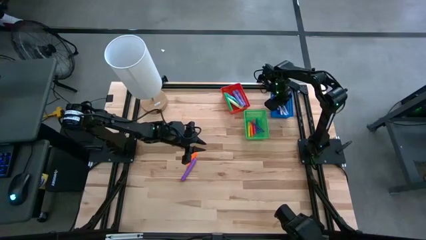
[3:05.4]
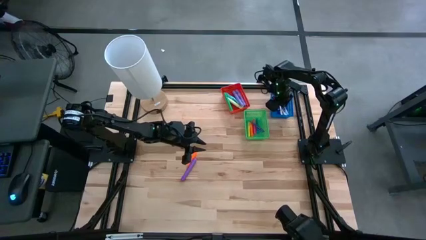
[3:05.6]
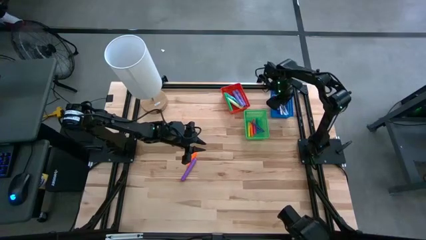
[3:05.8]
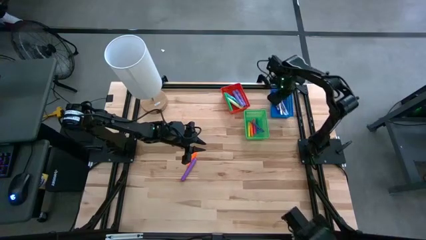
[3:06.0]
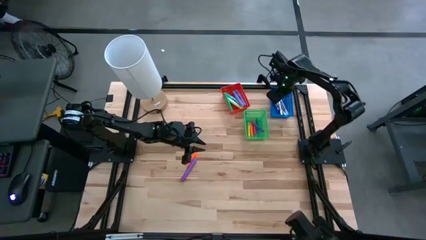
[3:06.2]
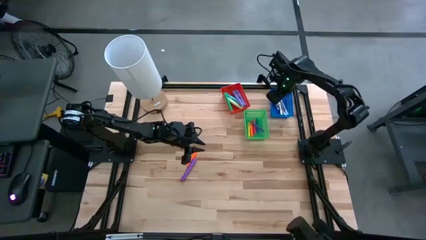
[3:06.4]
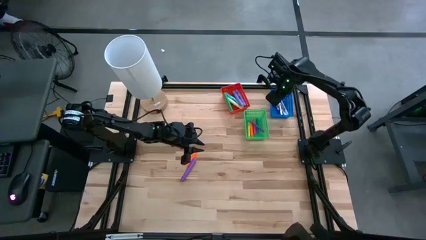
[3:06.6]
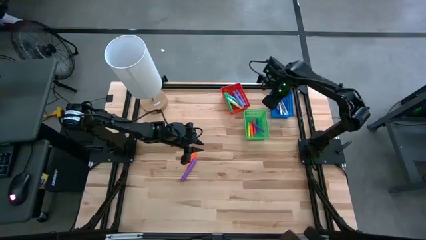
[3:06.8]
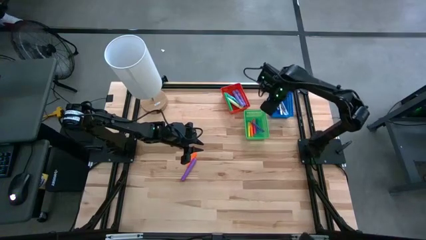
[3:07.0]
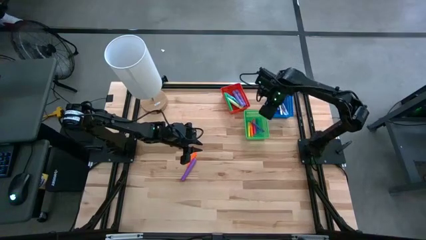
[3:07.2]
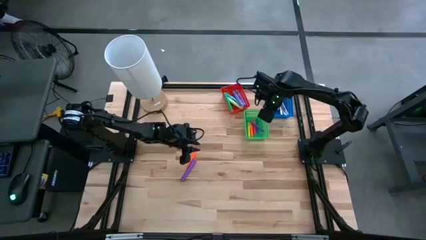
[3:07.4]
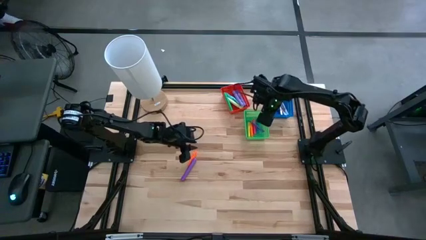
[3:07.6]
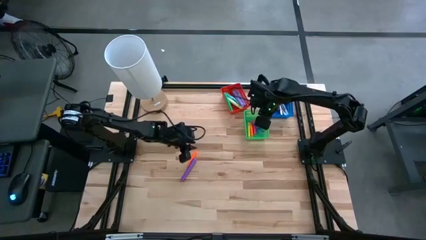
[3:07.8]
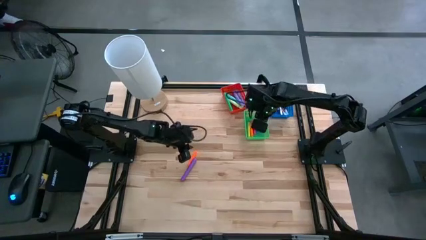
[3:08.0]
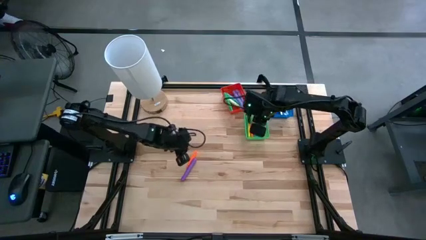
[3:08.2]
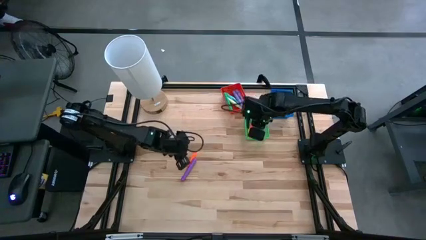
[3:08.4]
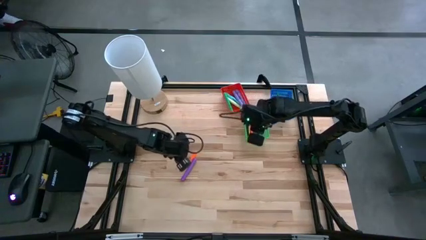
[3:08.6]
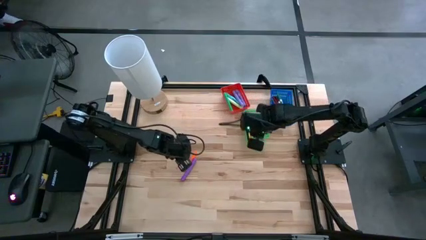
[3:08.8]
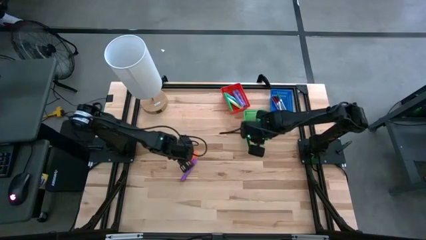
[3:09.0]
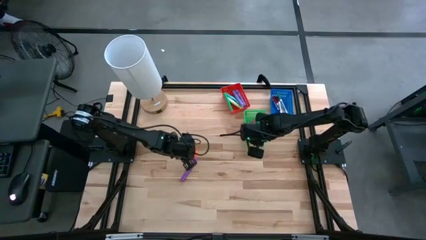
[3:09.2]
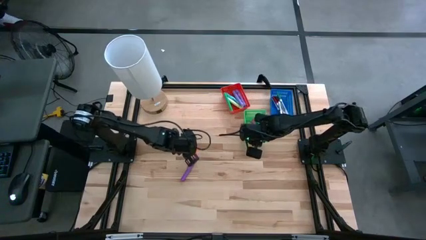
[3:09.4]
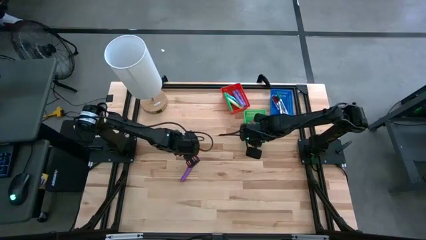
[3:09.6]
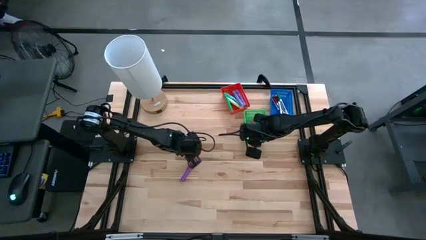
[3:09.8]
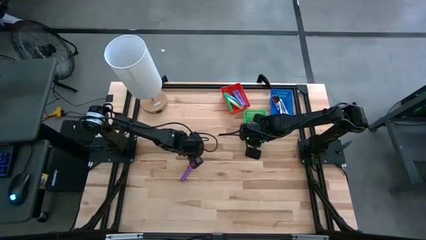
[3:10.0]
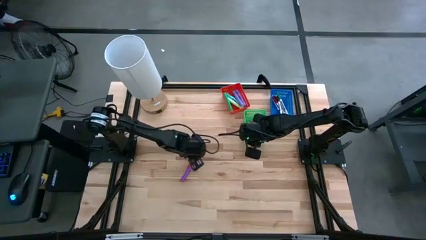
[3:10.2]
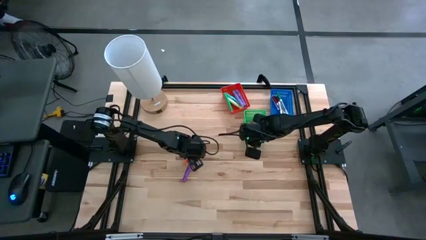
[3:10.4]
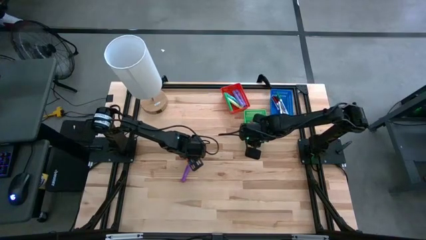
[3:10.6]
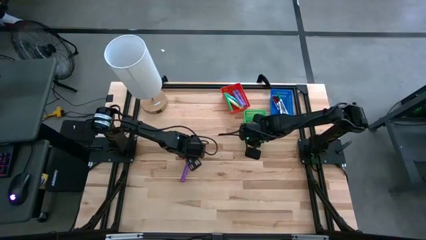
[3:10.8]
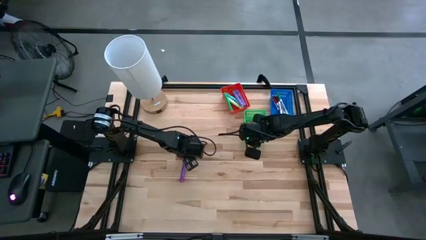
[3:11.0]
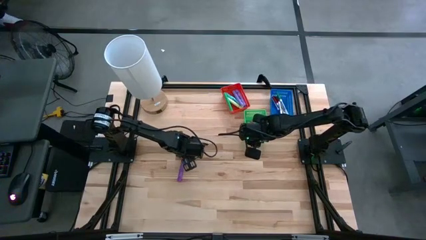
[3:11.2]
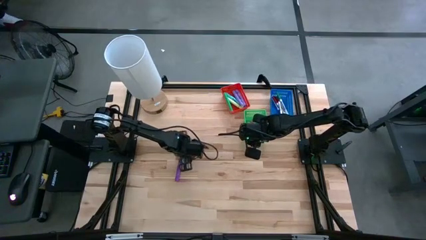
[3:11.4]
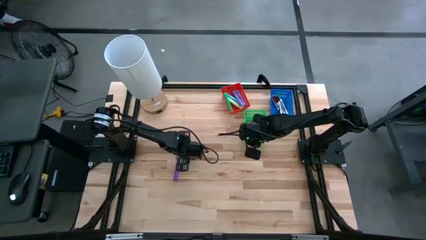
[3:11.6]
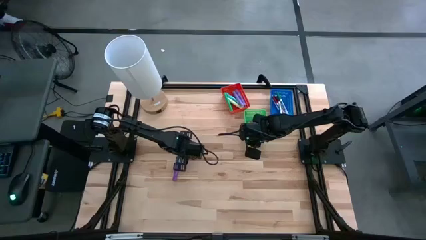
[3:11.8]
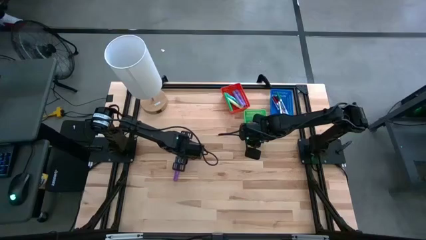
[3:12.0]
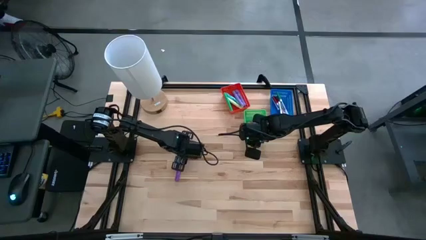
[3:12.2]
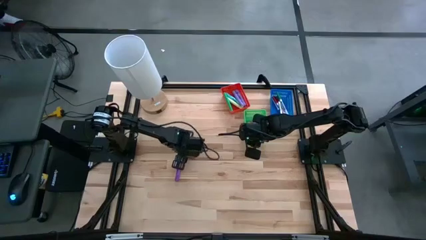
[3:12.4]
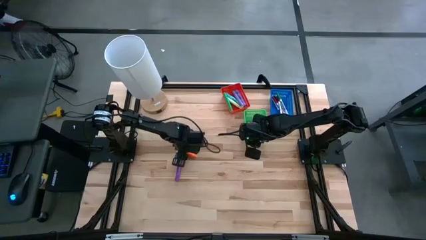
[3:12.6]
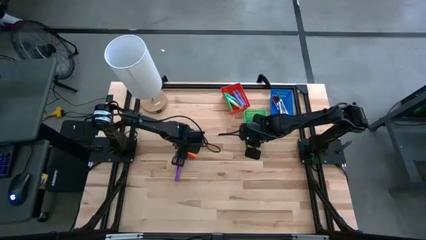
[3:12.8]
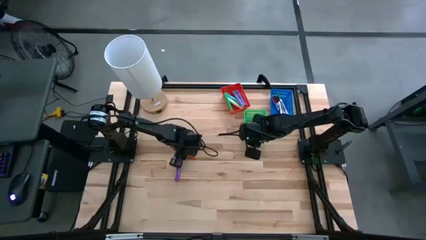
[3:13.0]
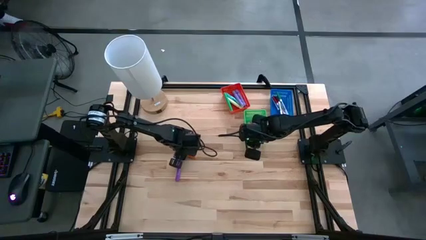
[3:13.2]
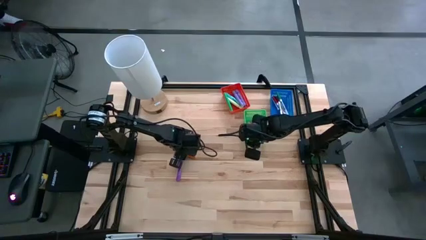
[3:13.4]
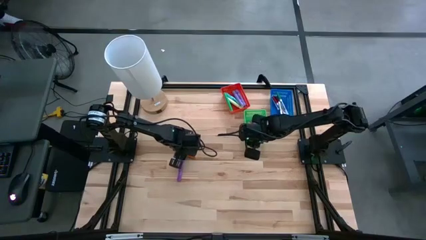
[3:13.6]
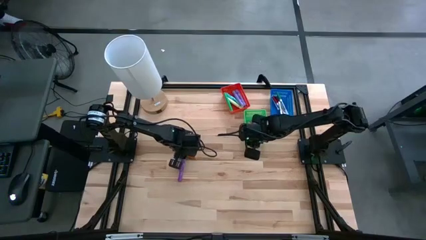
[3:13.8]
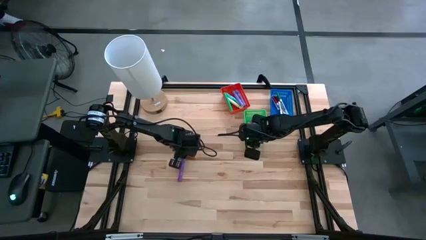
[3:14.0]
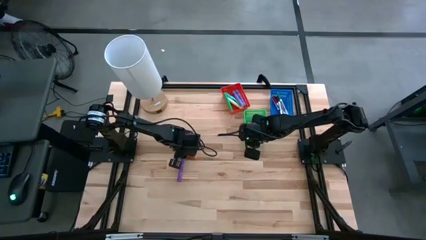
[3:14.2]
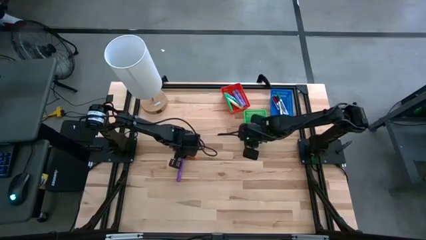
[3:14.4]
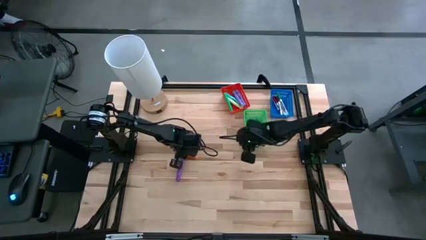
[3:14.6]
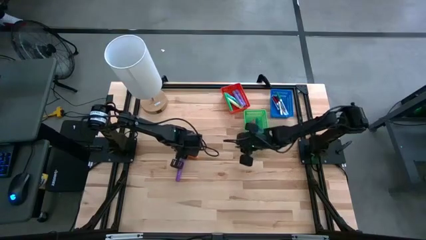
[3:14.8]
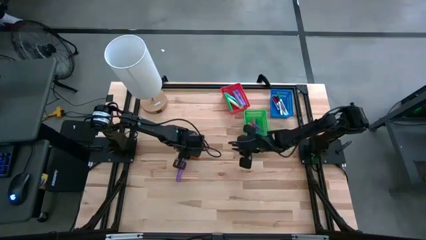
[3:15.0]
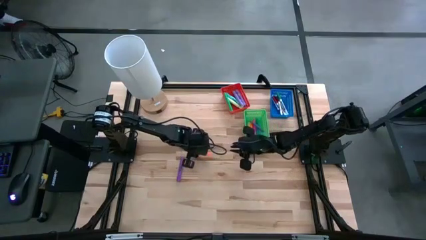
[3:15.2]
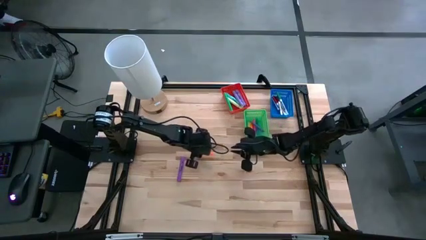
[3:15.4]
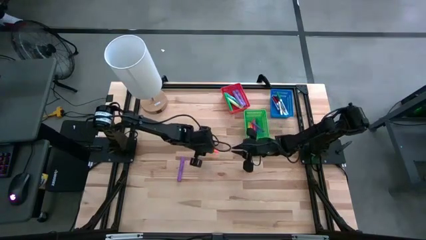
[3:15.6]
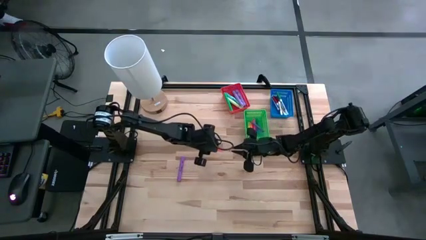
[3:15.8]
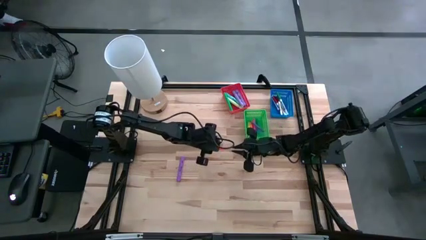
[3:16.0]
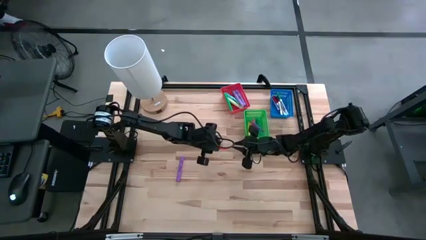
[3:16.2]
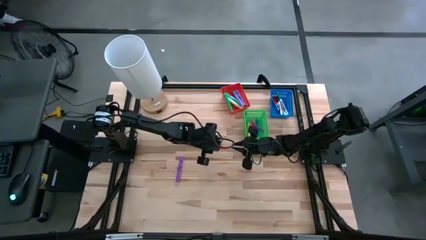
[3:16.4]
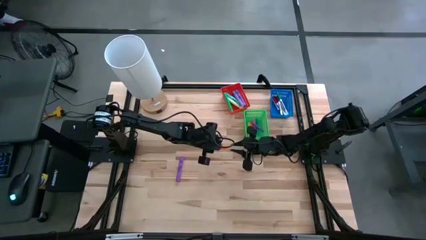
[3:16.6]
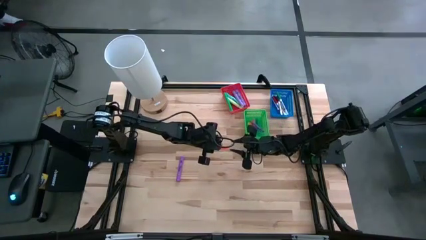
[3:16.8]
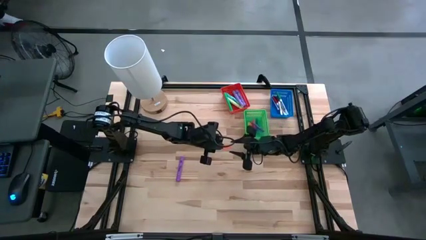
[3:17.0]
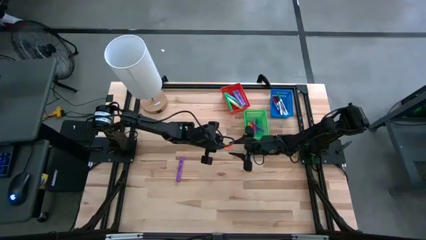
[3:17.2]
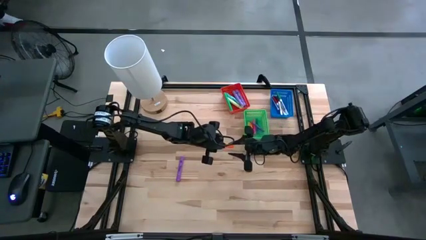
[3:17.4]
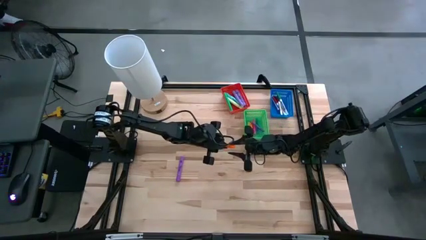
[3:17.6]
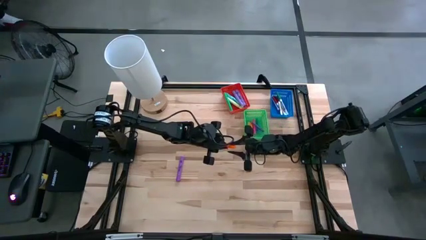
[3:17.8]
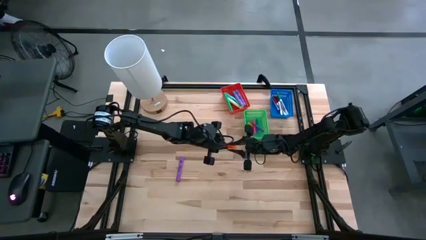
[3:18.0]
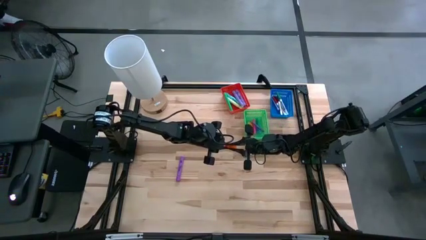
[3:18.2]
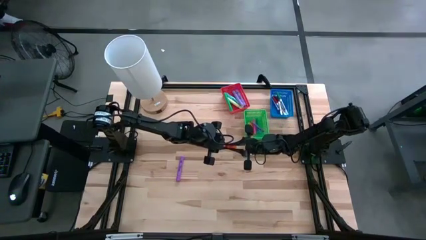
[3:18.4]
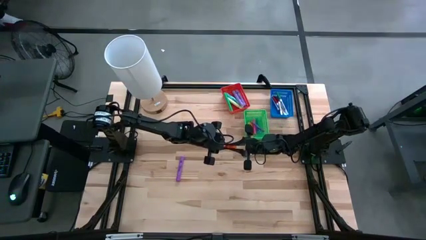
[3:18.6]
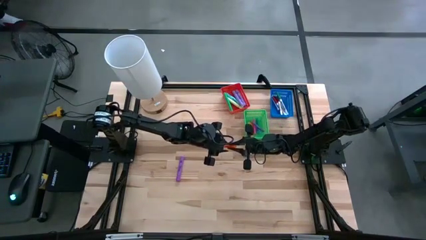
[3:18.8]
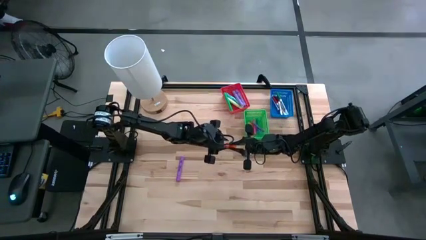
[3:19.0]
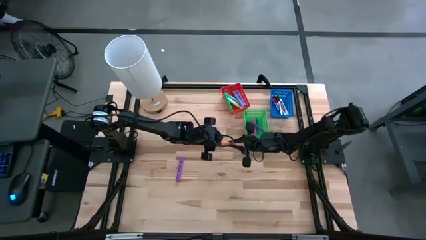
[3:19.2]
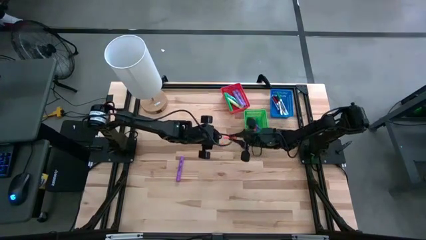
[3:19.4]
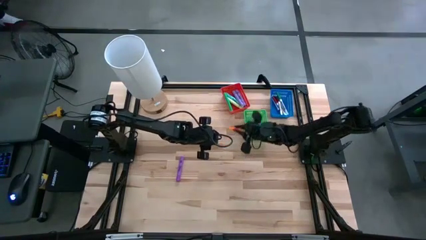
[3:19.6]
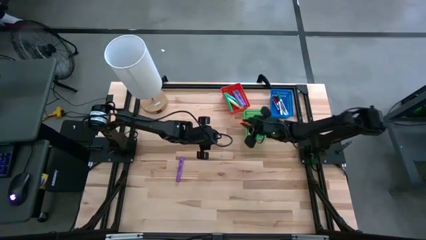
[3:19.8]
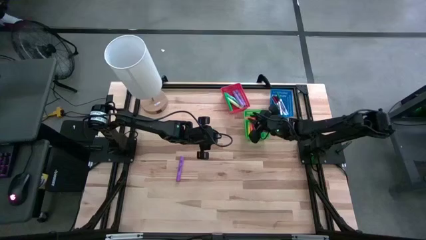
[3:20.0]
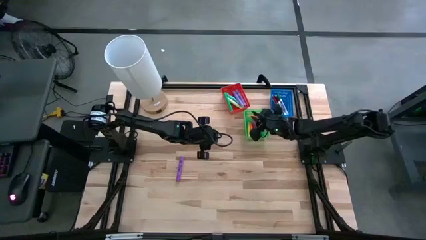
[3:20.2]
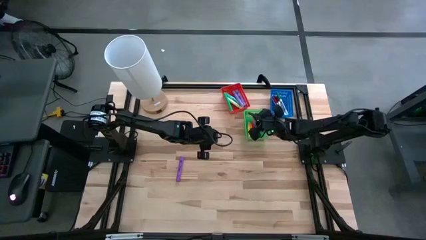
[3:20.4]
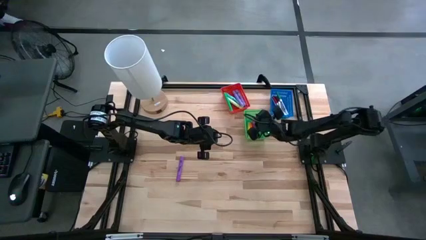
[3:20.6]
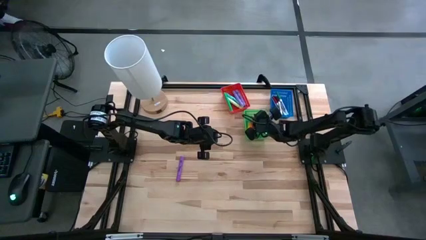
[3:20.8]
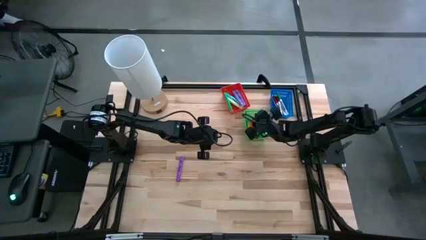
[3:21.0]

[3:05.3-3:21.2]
Task: Pick & Place Markers
Put the orange pen in the green bin
